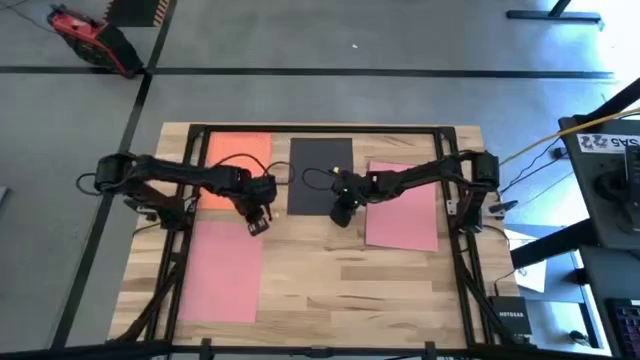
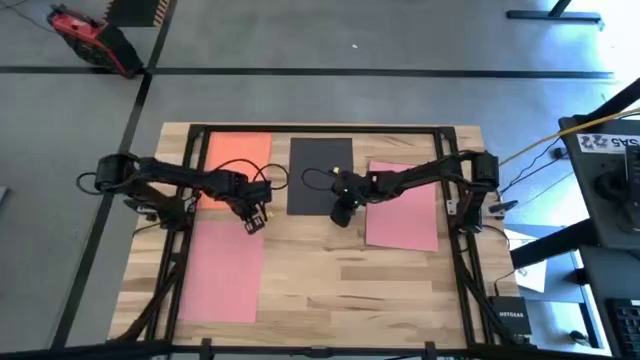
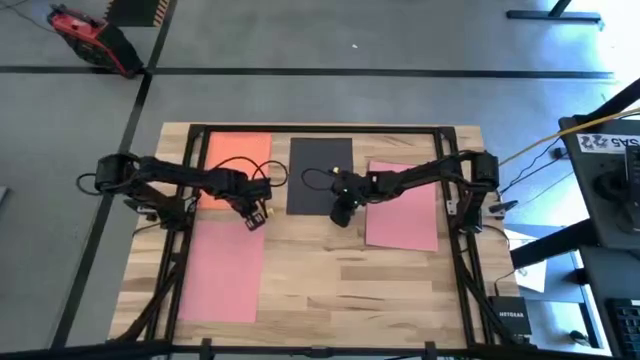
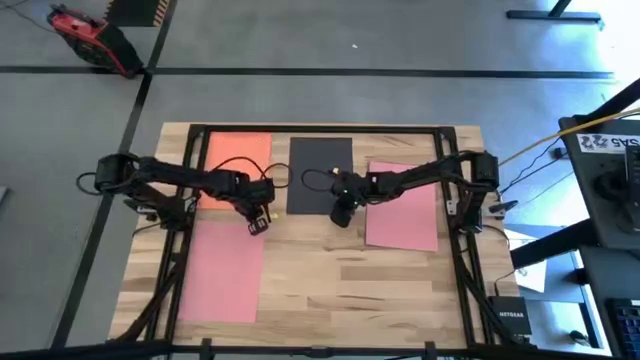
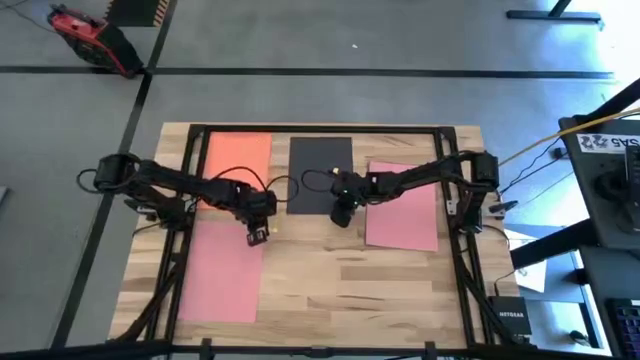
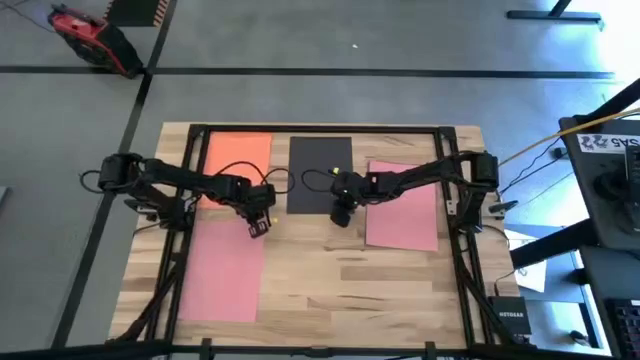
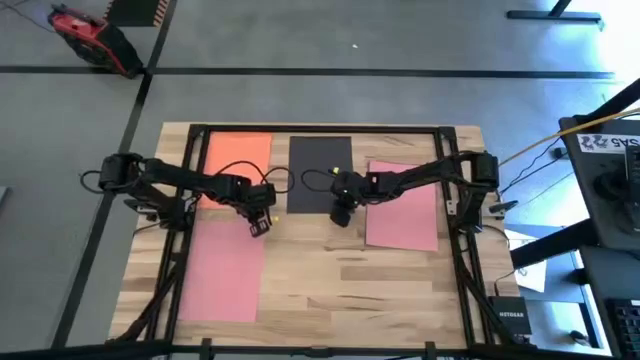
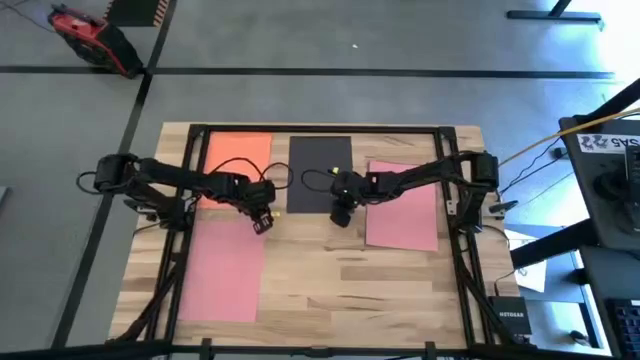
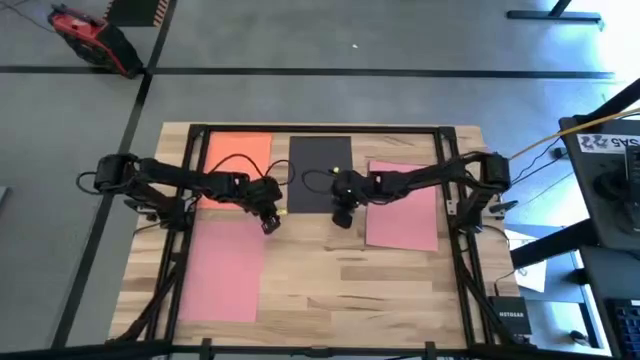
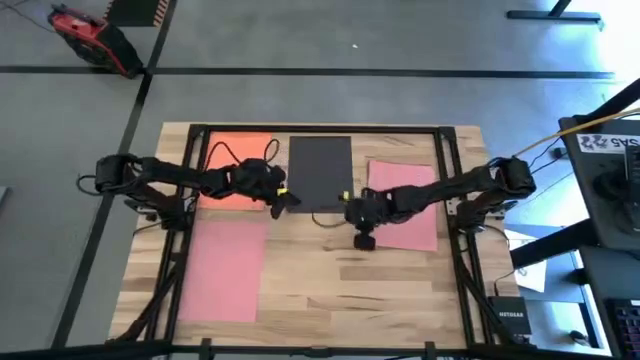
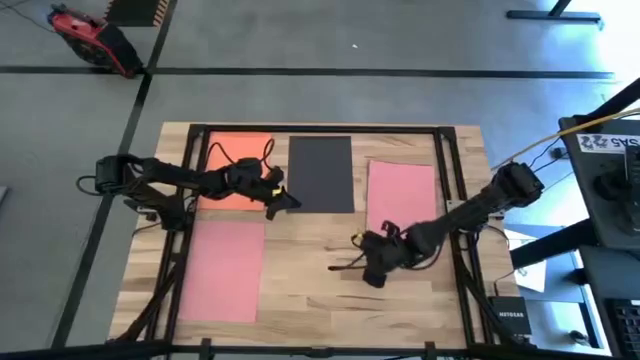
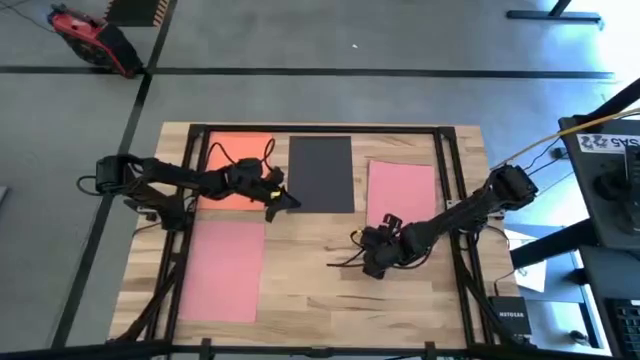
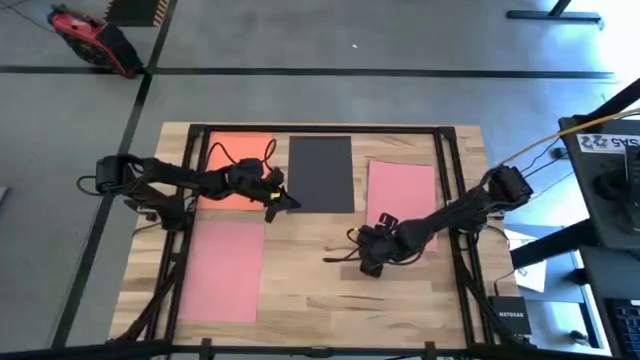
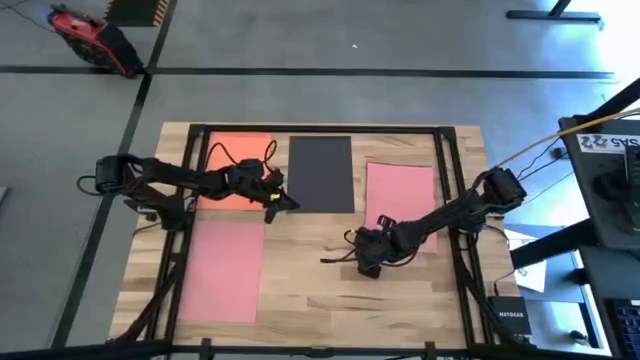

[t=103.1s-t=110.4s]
Task: Organize paper
Stack the pink color paper on top of the other pink color paper

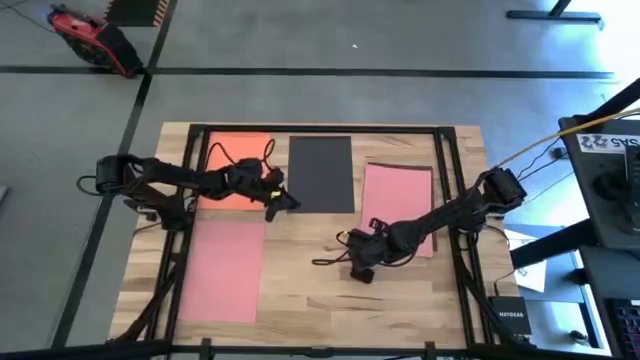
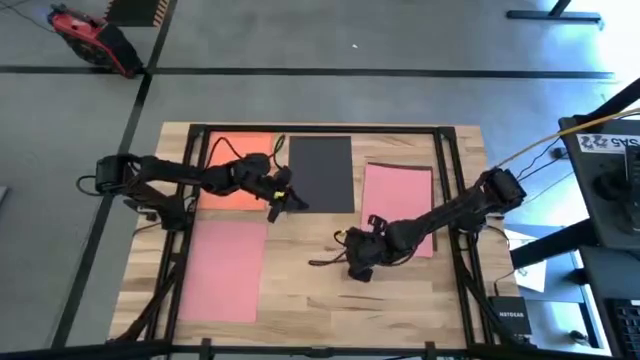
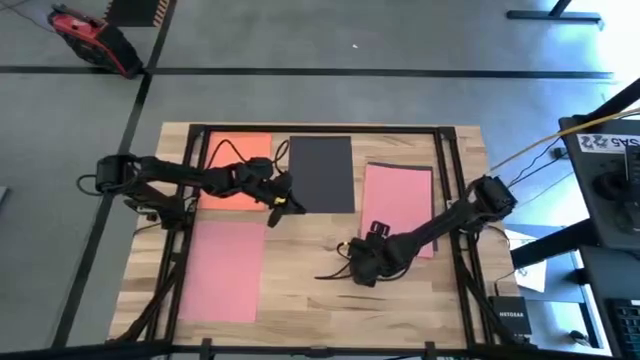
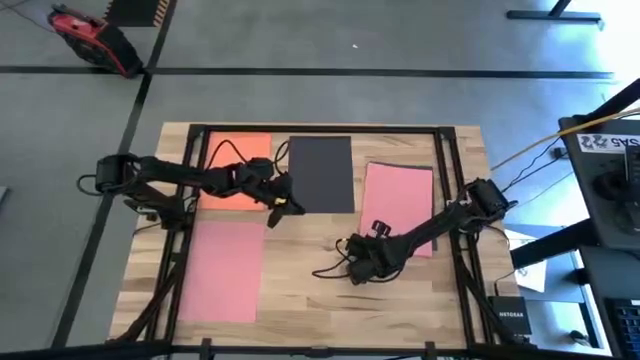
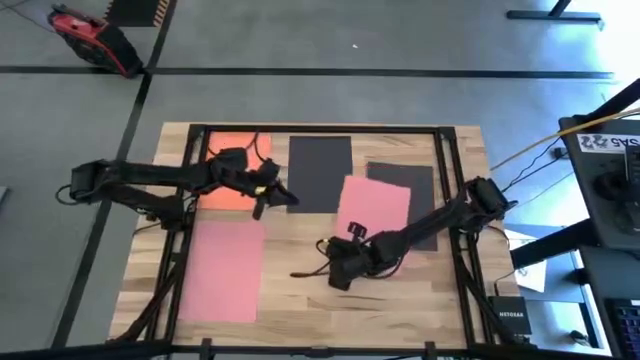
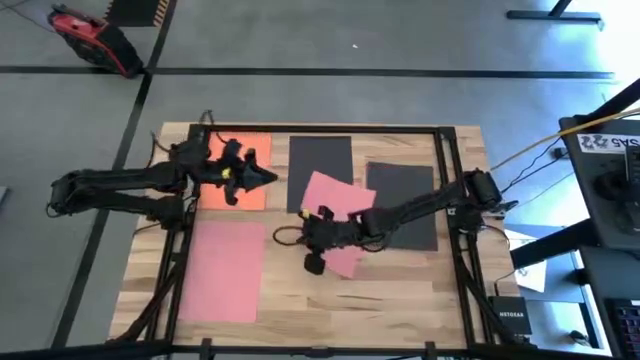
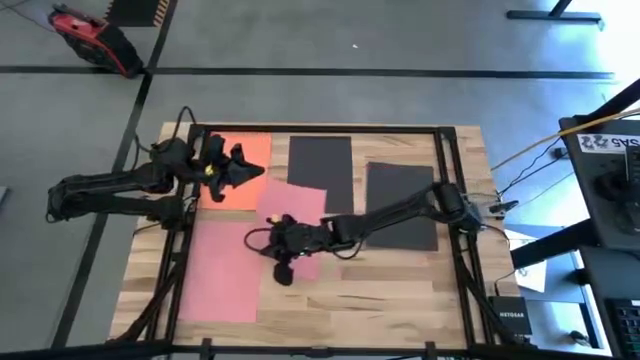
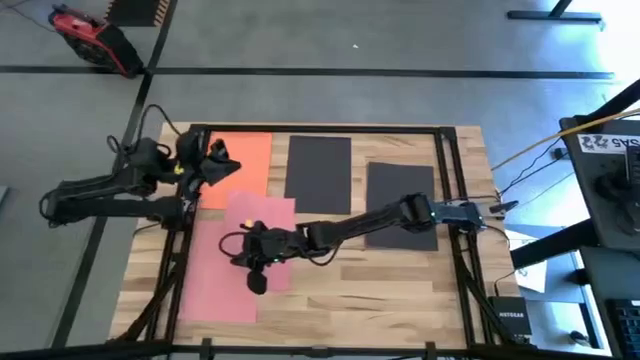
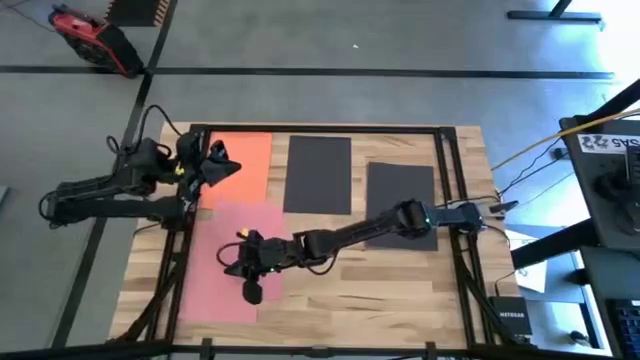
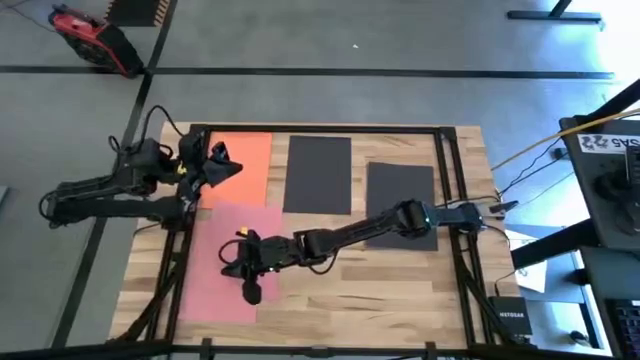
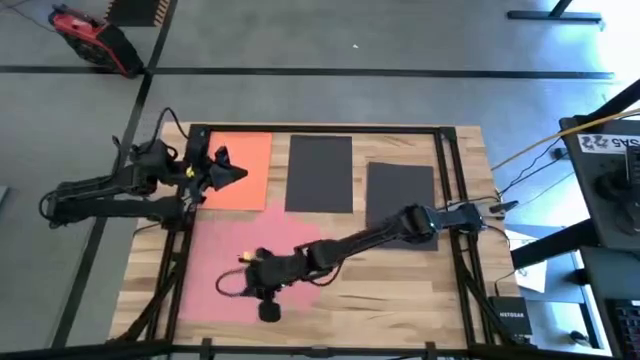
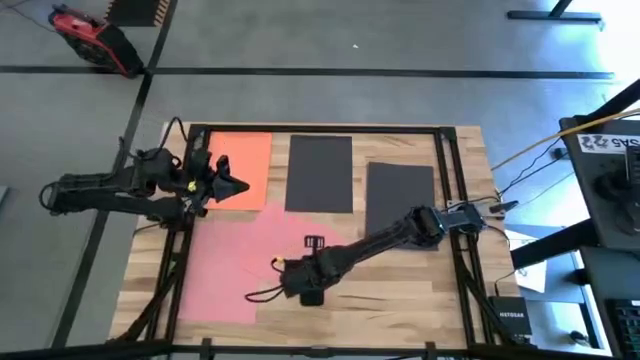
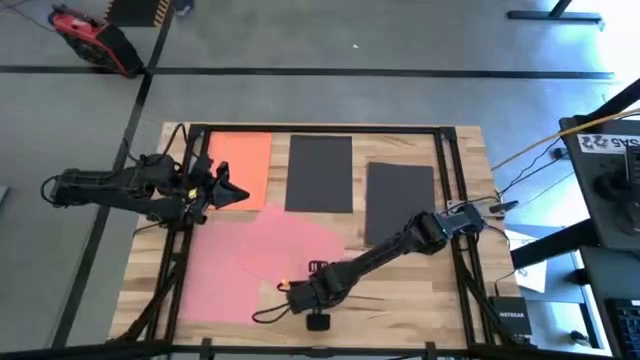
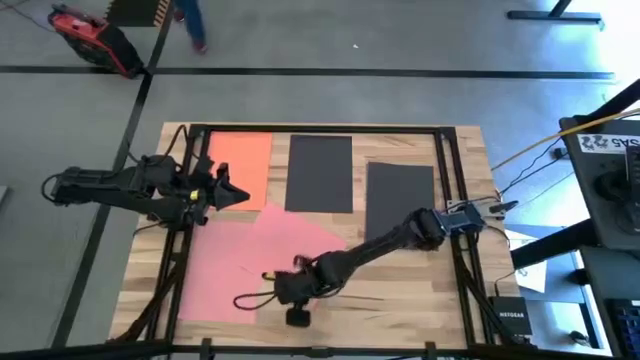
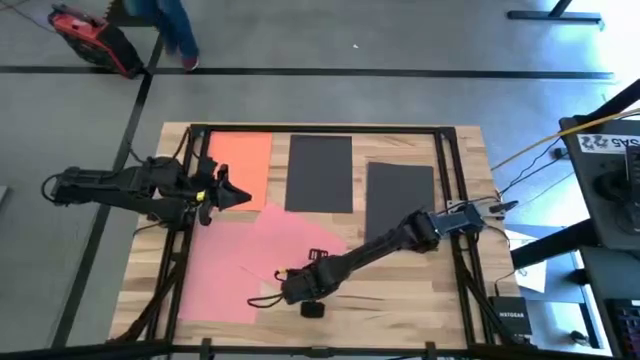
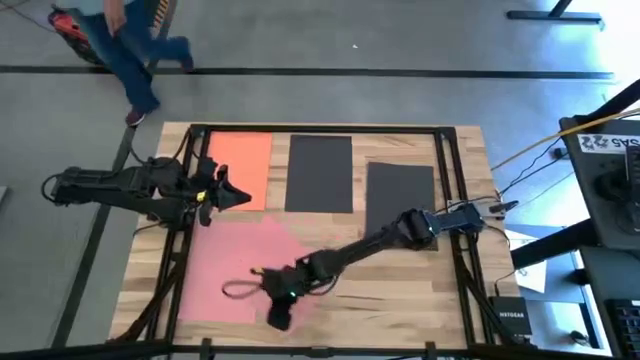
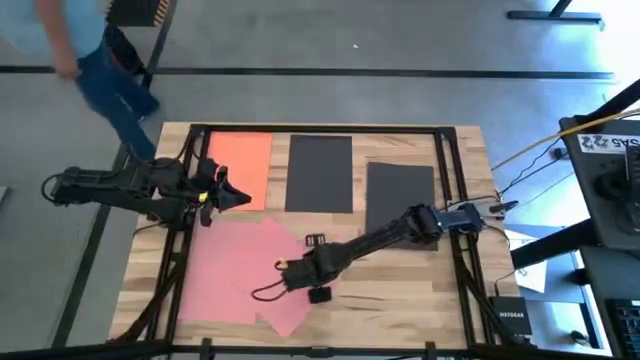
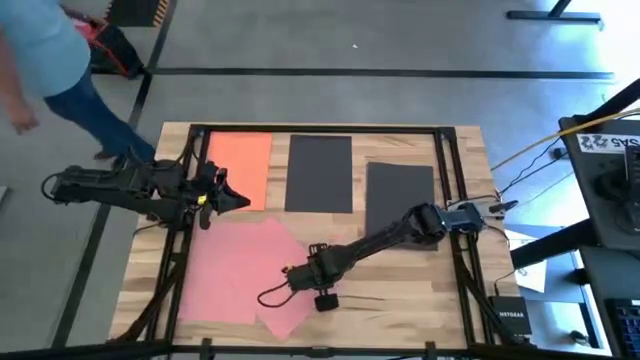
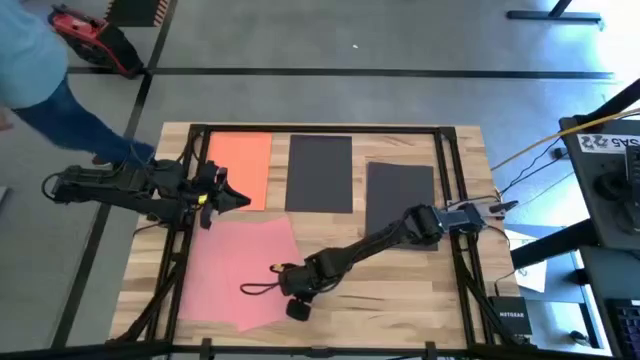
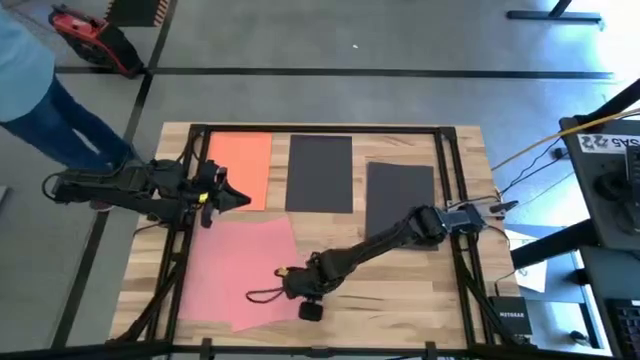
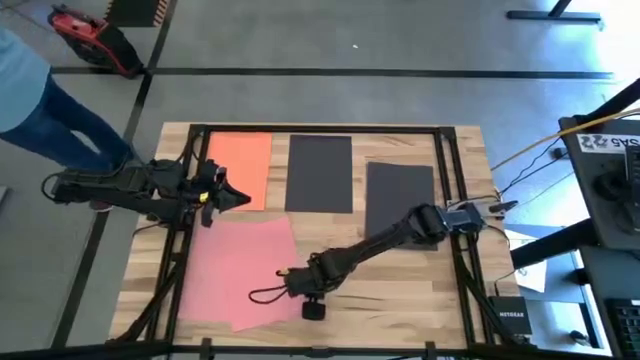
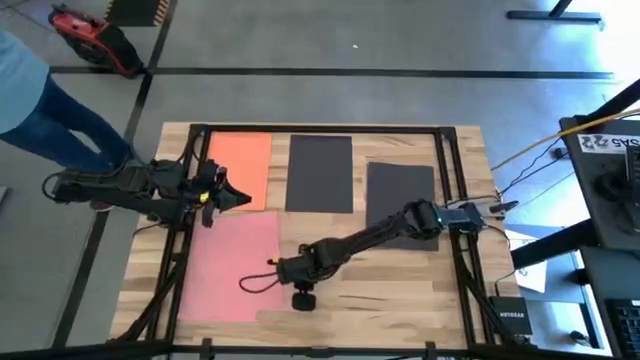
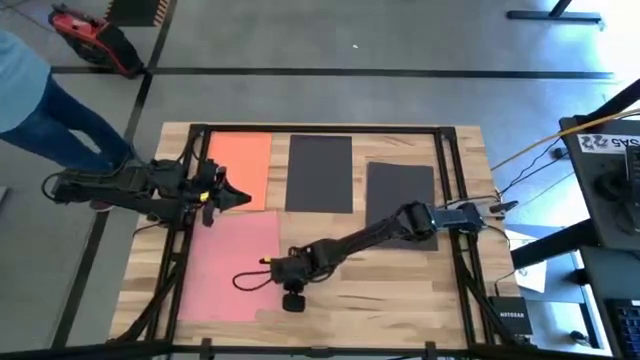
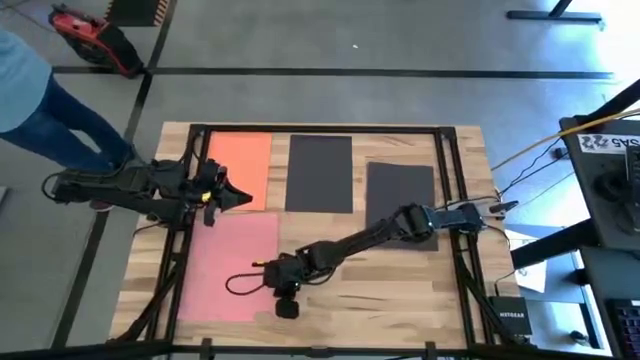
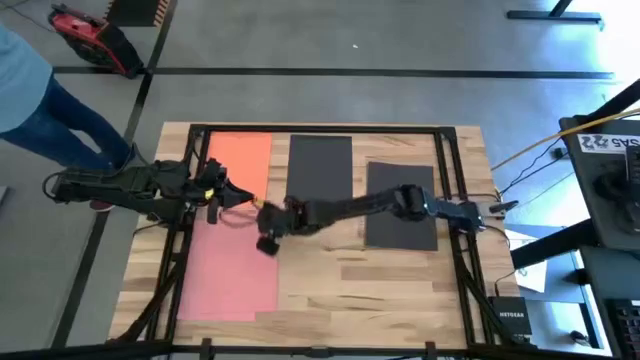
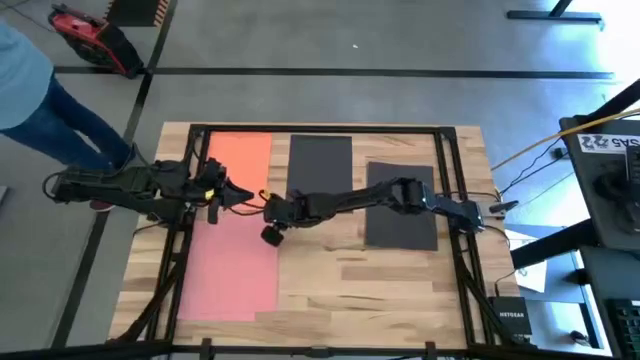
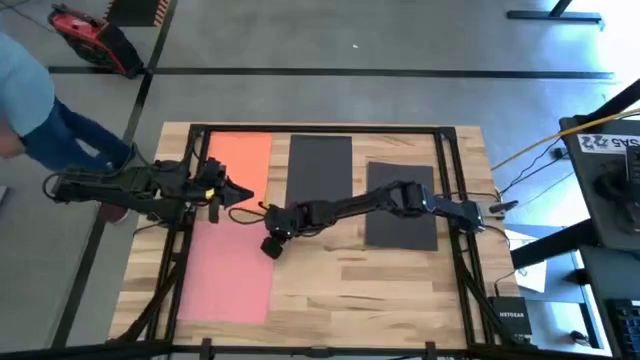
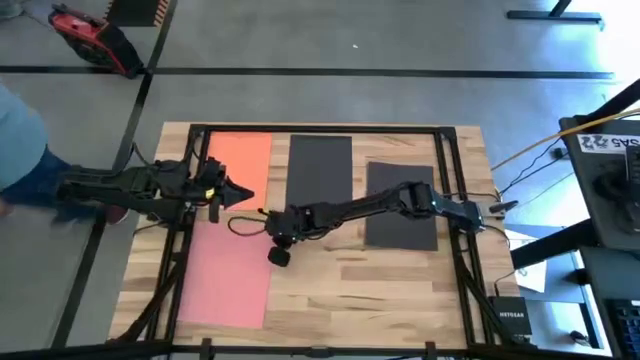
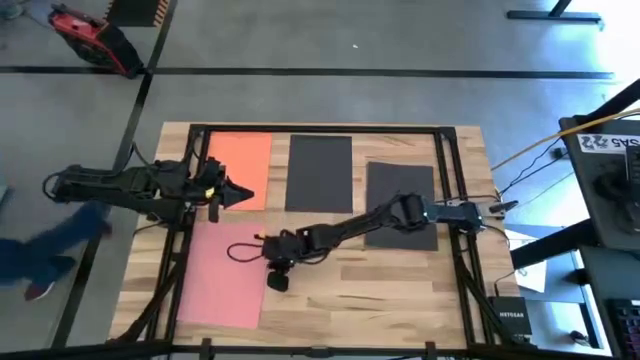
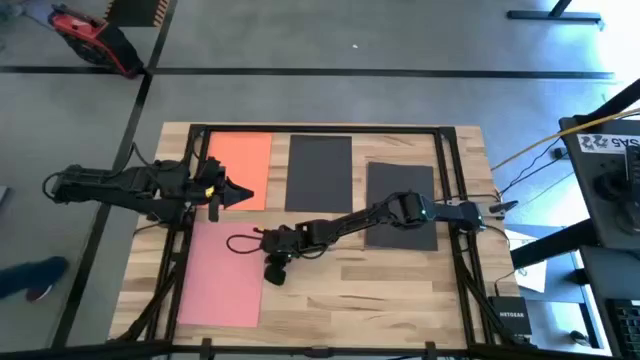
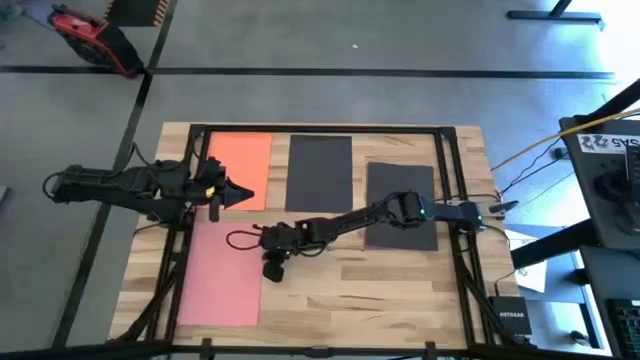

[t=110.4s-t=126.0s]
Stack the pink color paper on top of the other pink color paper
